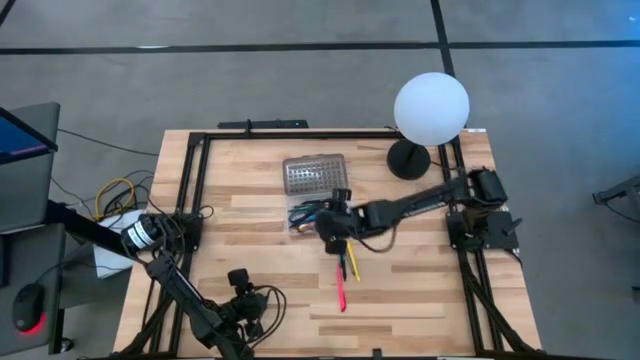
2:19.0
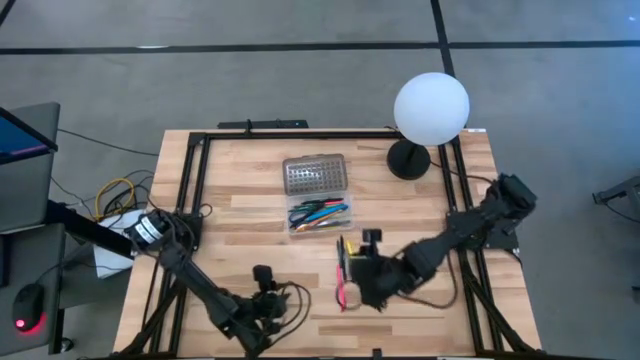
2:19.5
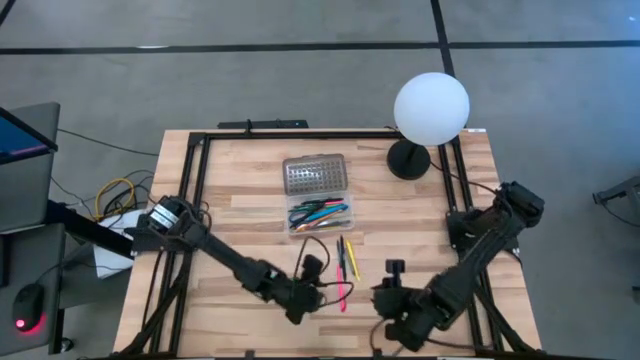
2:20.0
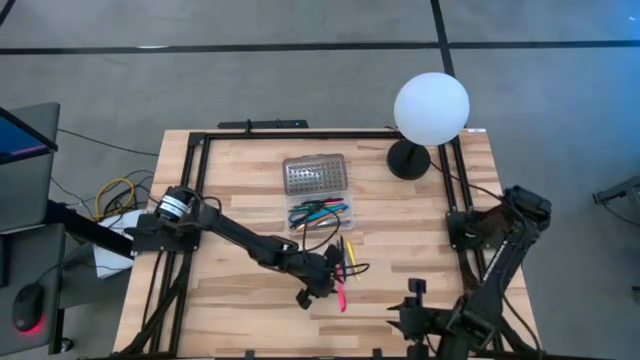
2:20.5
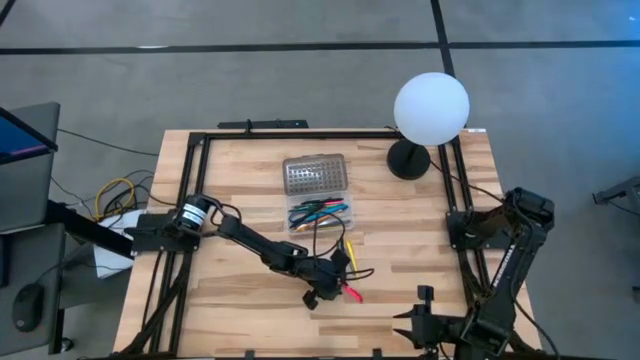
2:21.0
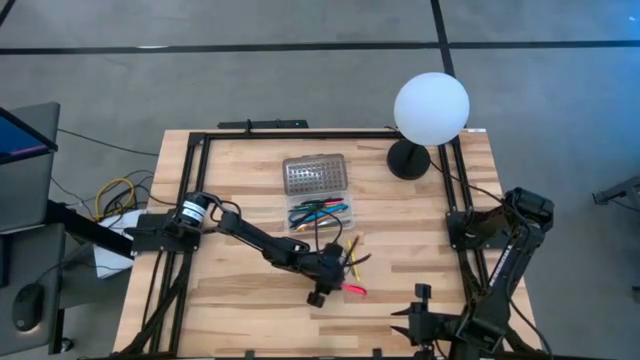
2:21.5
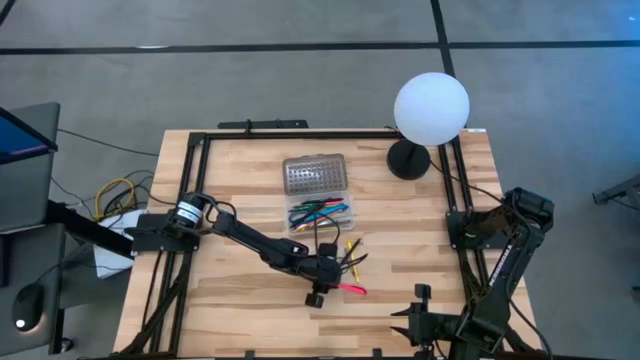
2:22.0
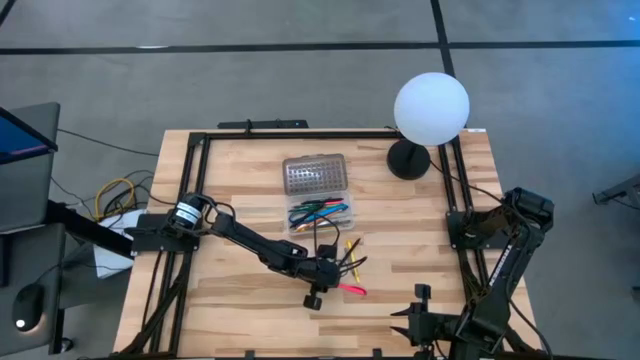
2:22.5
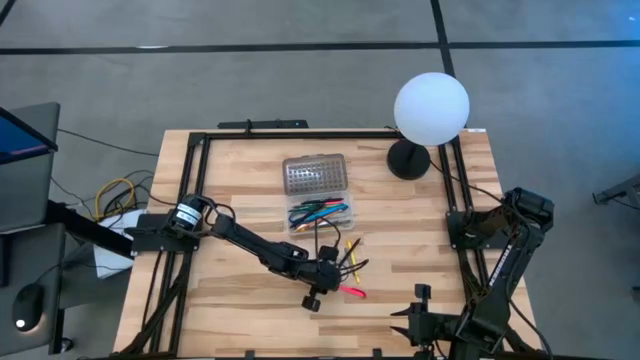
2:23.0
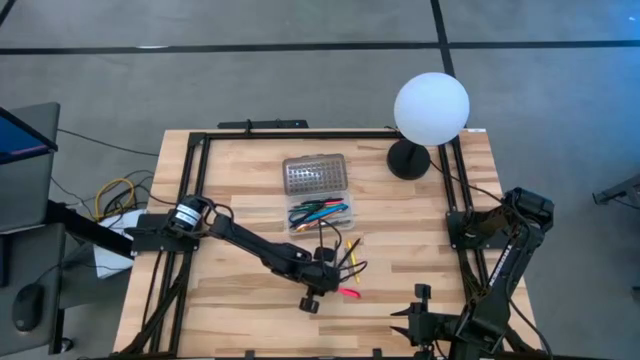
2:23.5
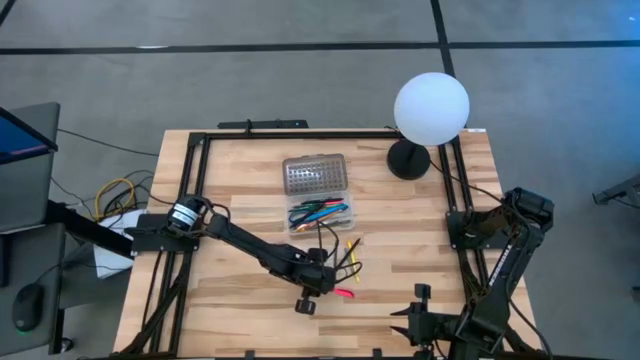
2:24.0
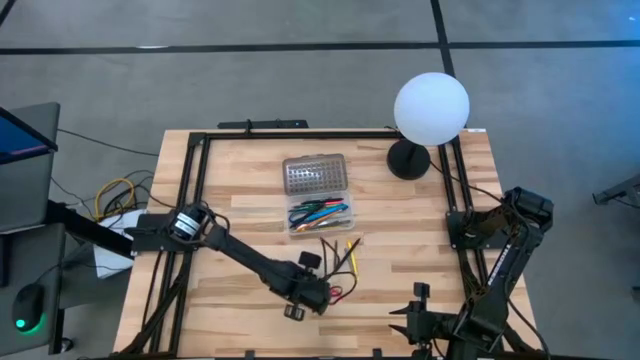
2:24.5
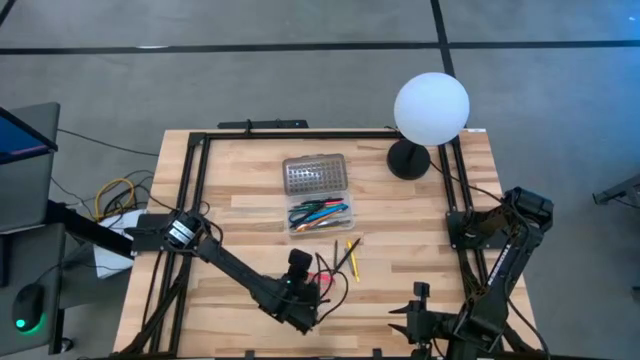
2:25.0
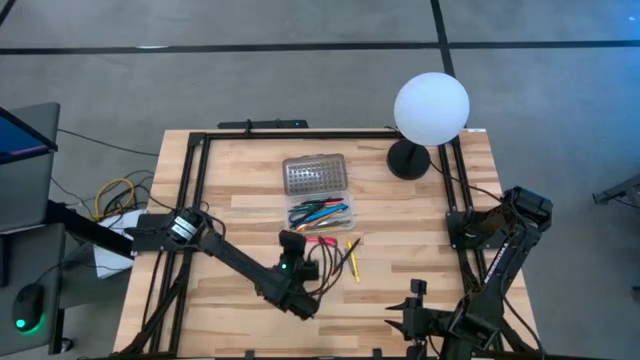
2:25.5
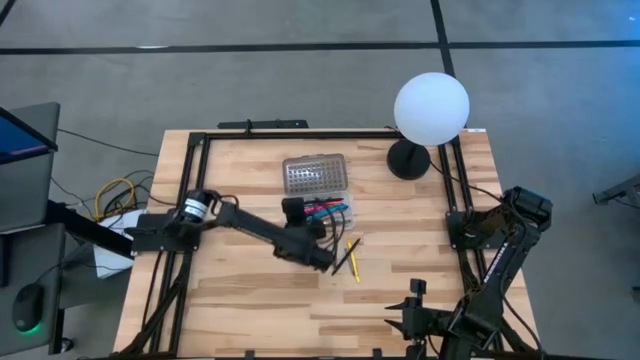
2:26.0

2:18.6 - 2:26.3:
Task: Pick & place school supplies into a supply box
Put the pink pen into the gray supply box

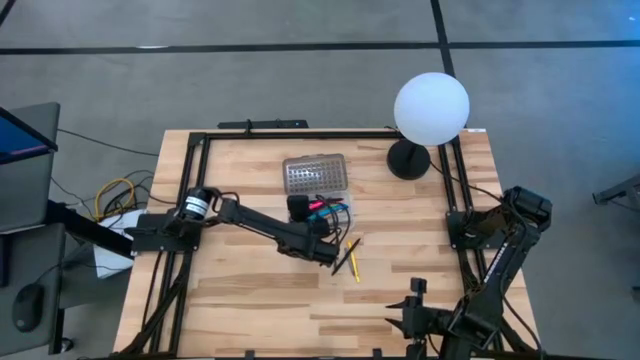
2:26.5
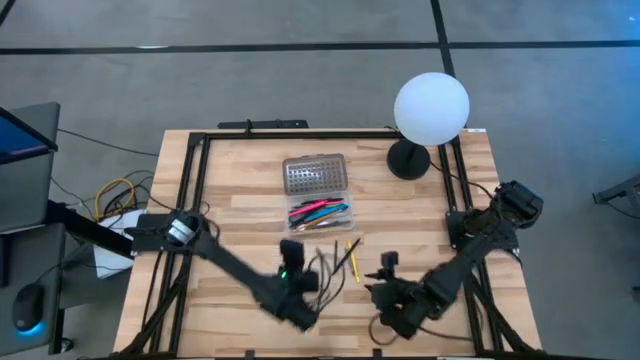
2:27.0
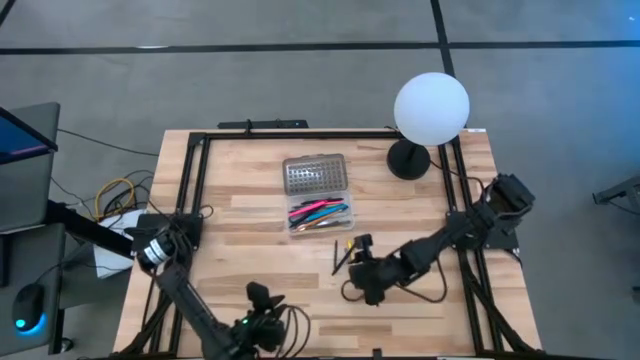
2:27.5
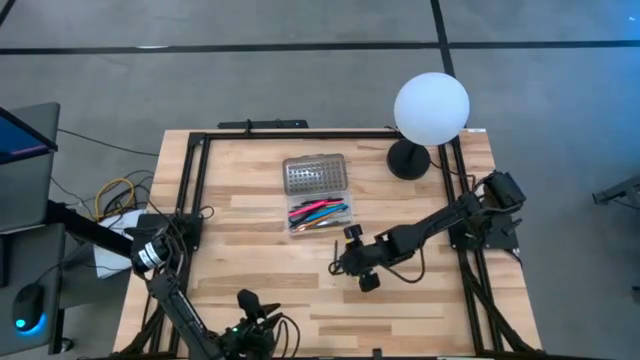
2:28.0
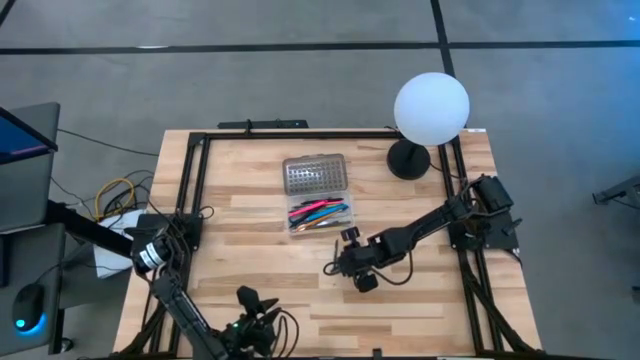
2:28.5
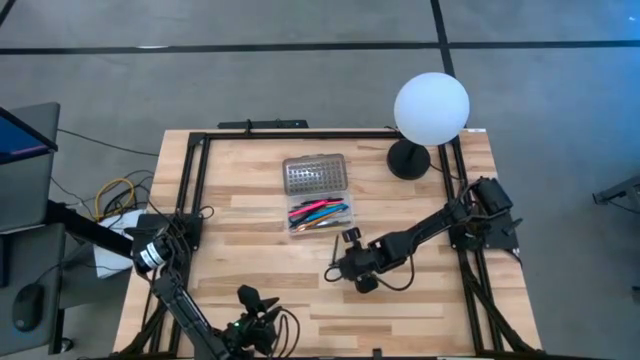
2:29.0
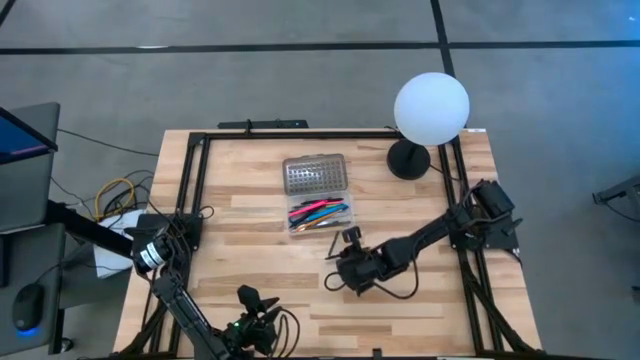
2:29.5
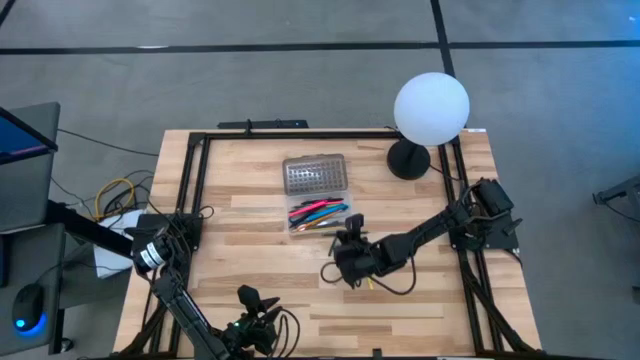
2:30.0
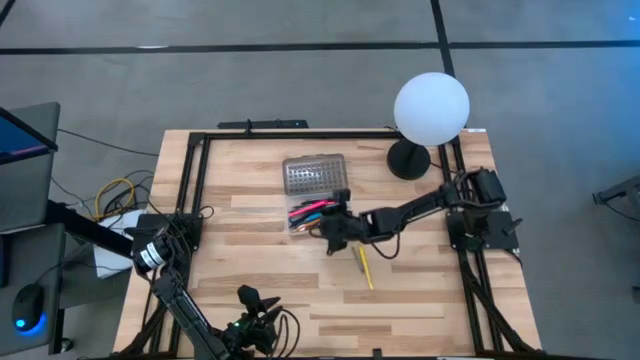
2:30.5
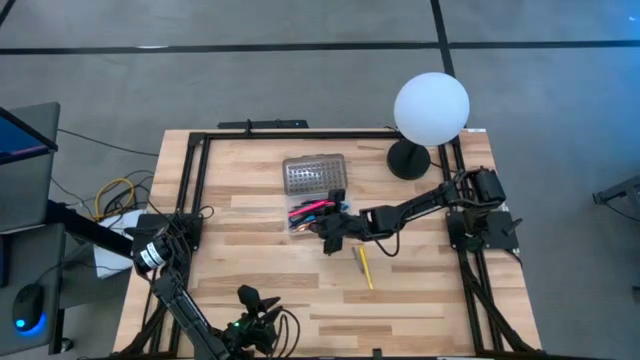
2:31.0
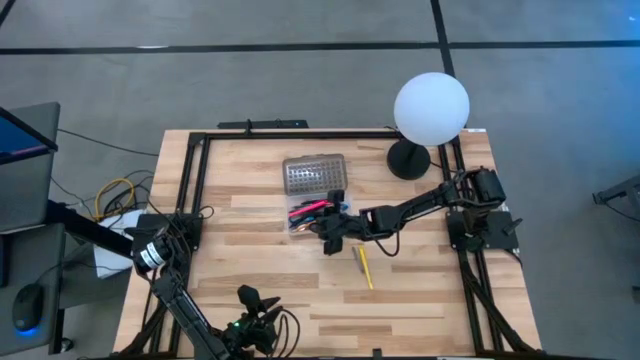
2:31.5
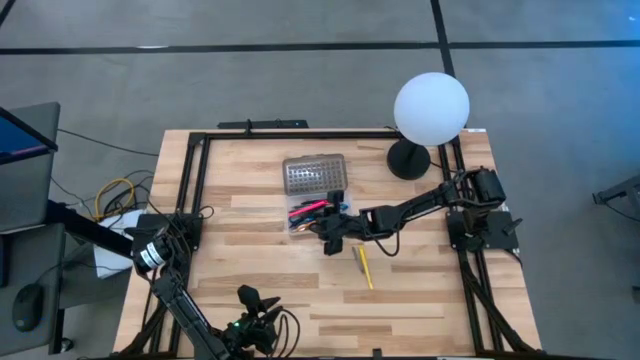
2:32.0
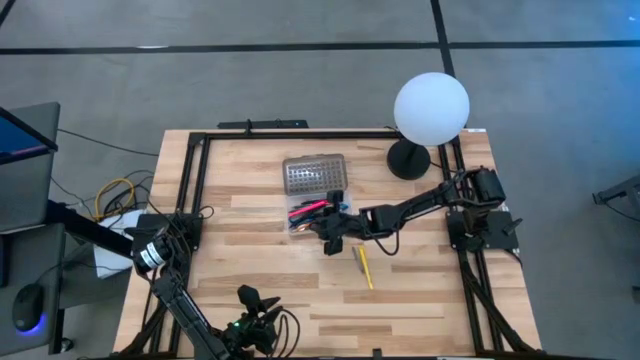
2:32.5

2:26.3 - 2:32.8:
Put the black pen into the gray supply box

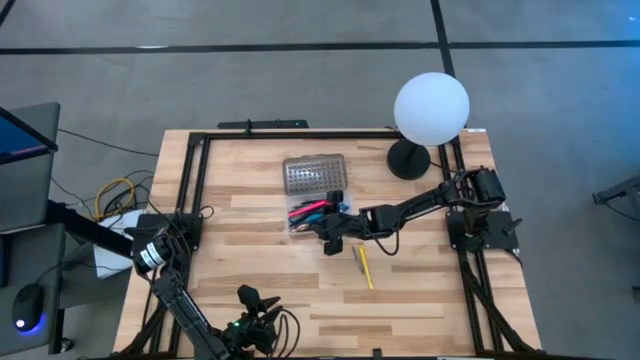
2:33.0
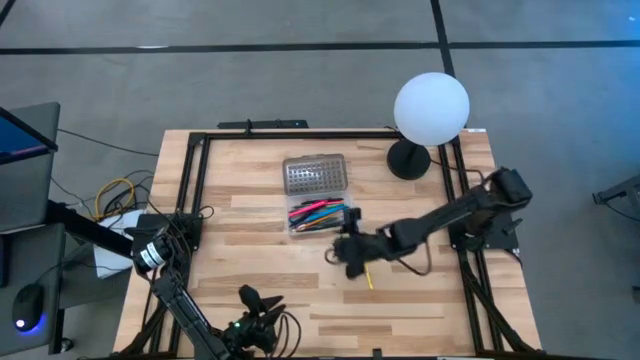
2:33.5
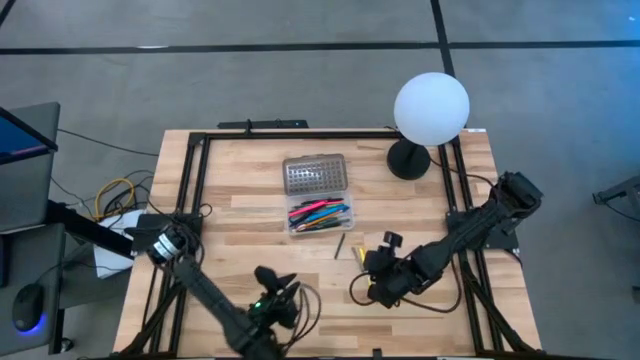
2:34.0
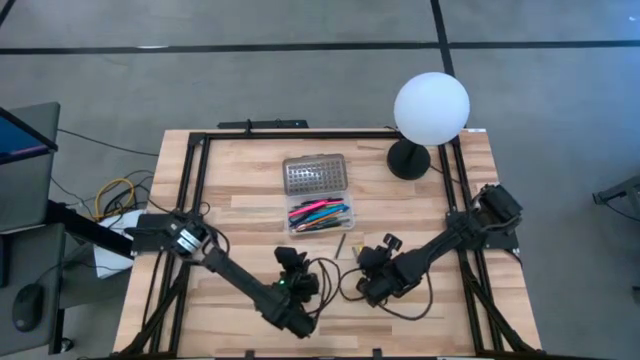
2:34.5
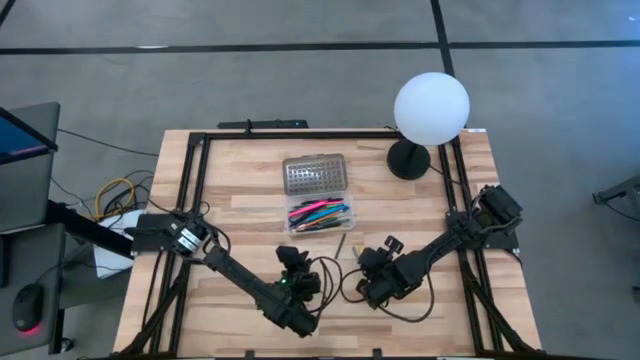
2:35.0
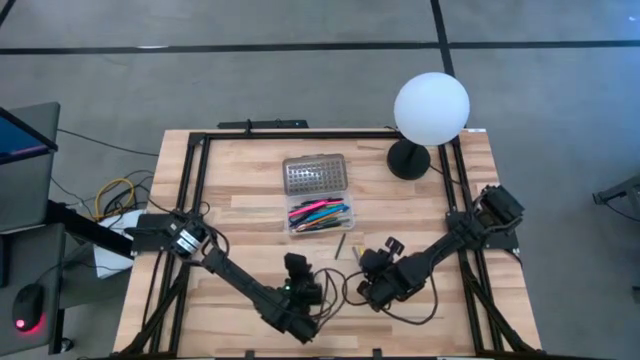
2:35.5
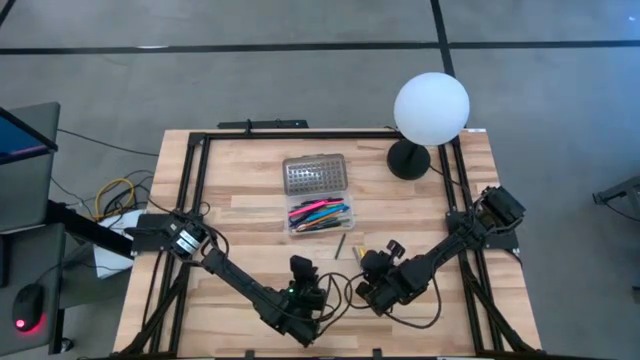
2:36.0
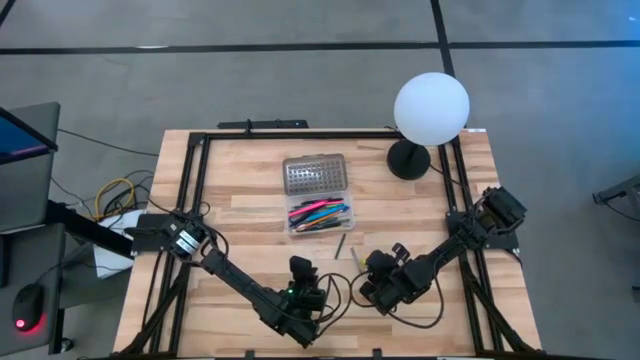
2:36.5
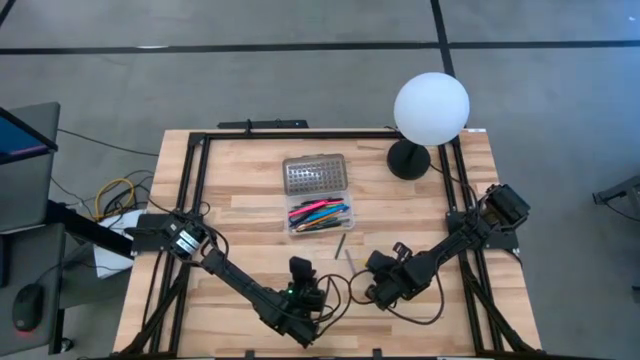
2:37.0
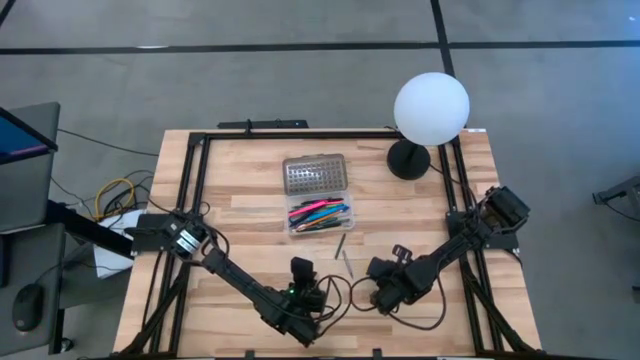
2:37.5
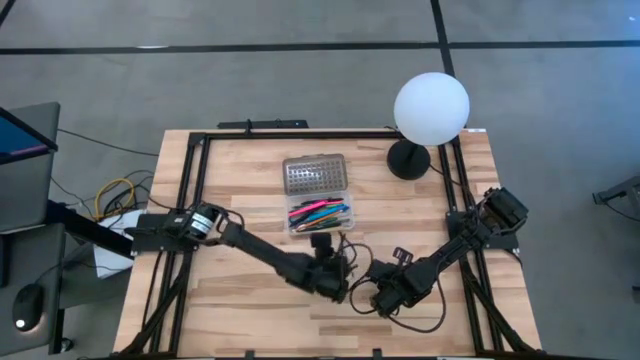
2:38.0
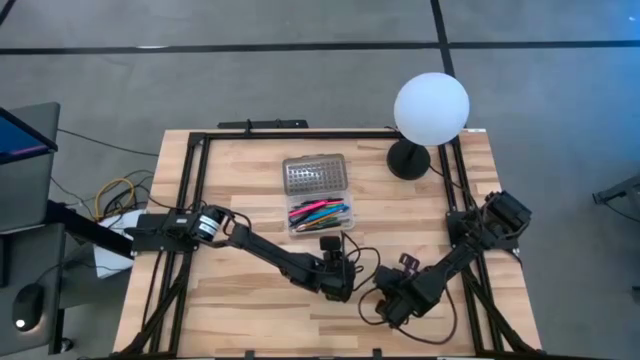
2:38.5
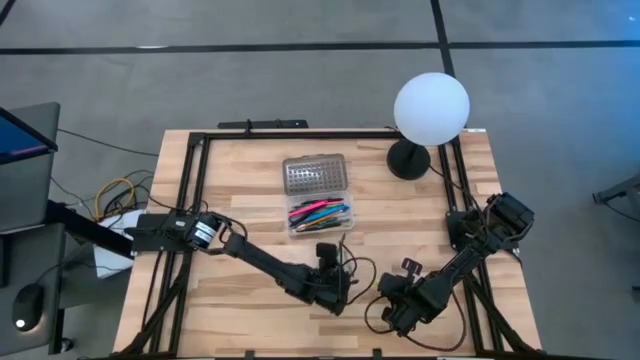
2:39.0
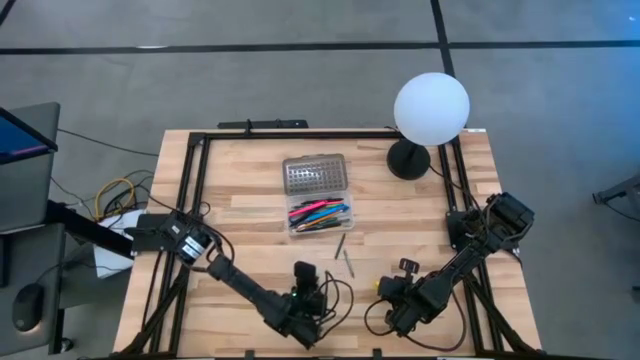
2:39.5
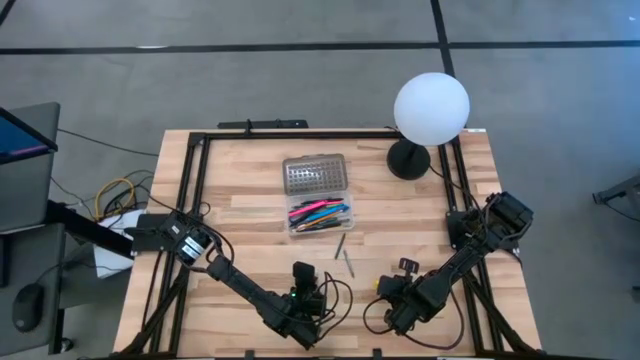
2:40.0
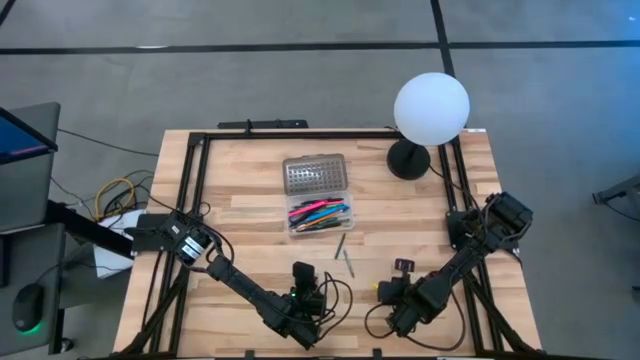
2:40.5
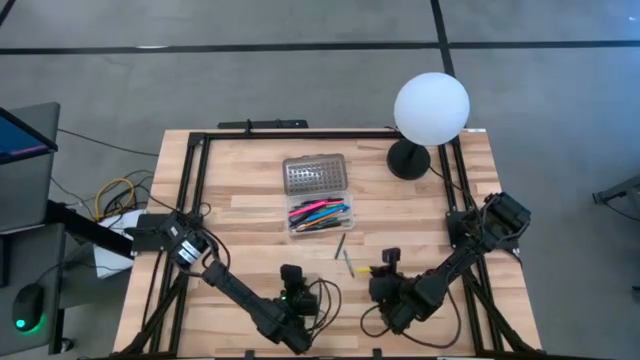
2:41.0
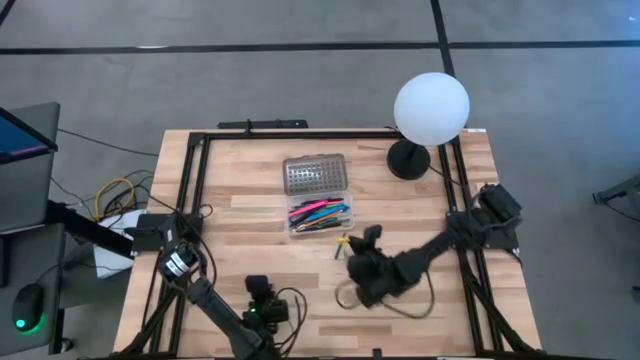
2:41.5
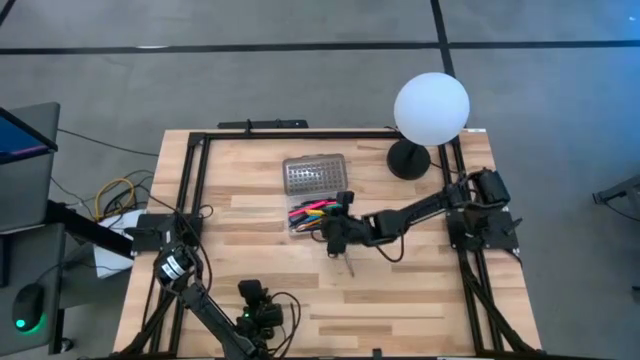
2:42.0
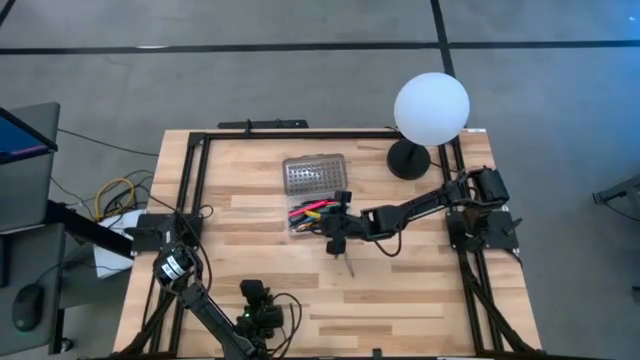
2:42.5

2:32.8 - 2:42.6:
Put the yellow pen into the gray supply box
